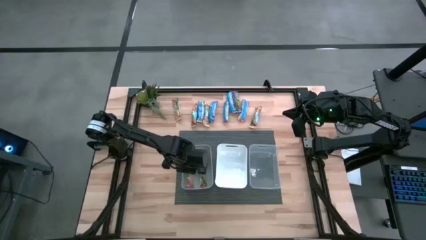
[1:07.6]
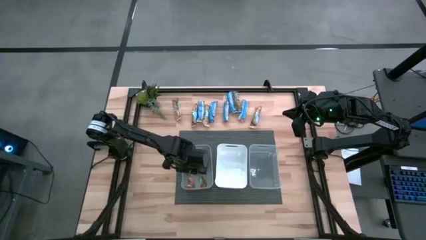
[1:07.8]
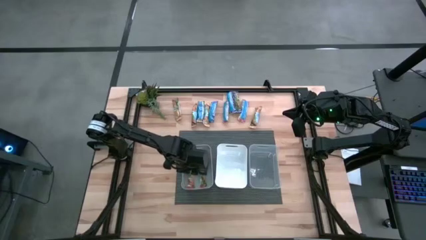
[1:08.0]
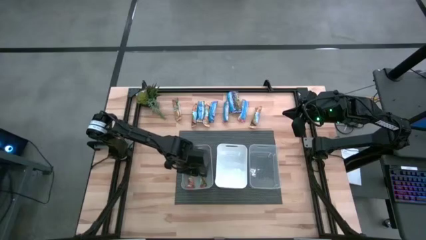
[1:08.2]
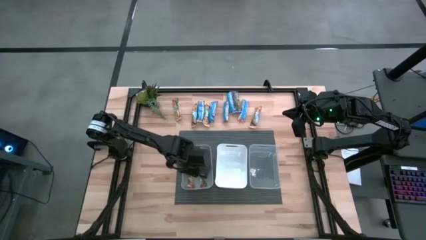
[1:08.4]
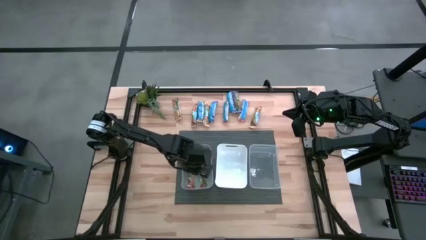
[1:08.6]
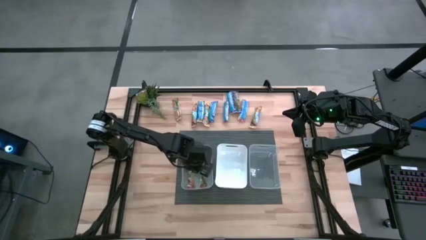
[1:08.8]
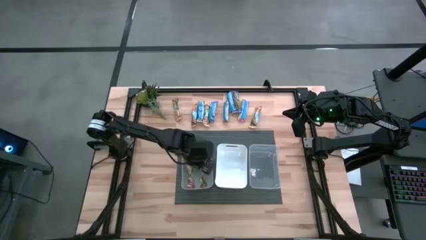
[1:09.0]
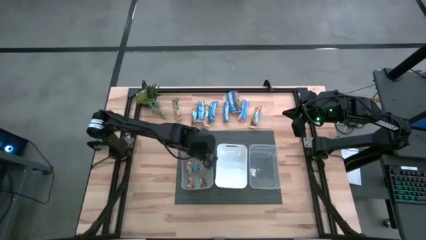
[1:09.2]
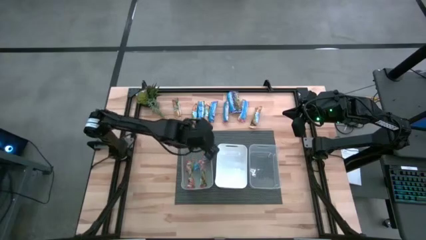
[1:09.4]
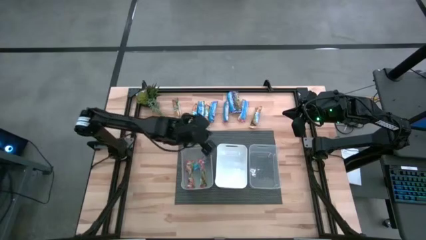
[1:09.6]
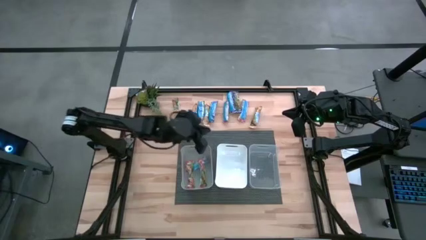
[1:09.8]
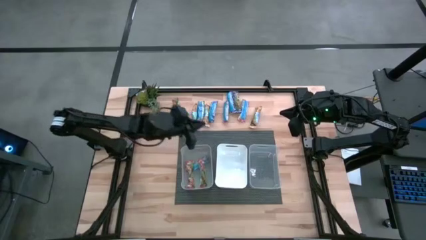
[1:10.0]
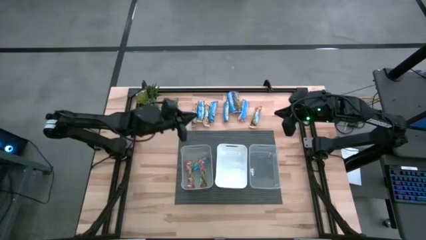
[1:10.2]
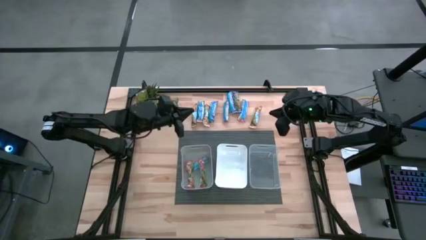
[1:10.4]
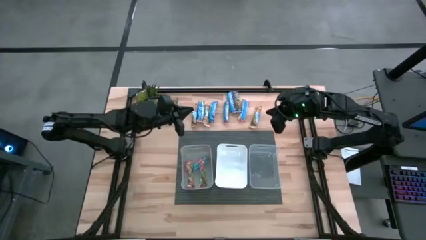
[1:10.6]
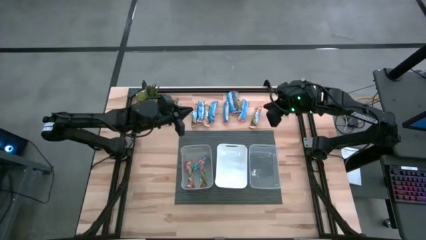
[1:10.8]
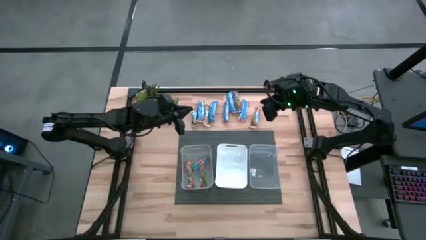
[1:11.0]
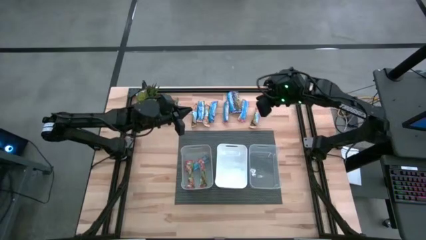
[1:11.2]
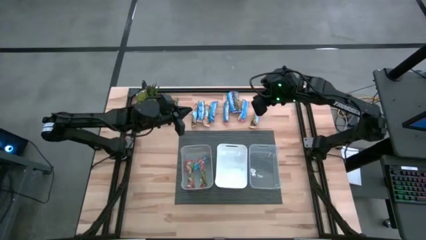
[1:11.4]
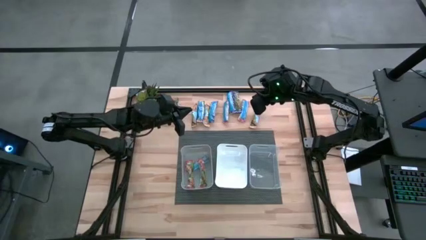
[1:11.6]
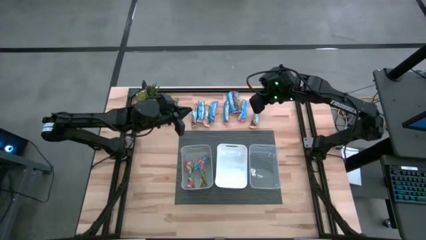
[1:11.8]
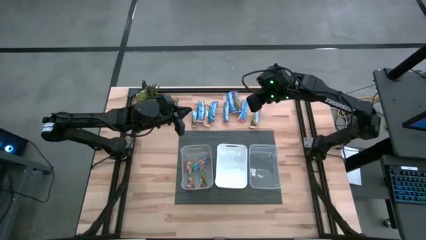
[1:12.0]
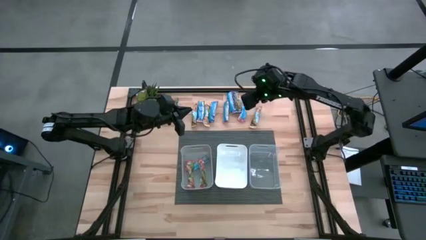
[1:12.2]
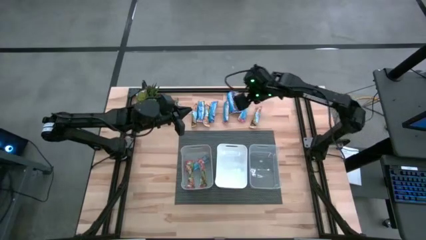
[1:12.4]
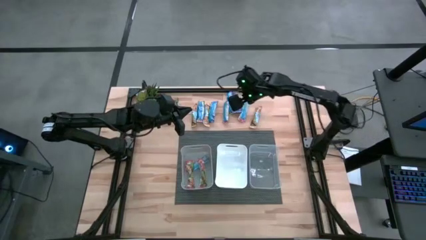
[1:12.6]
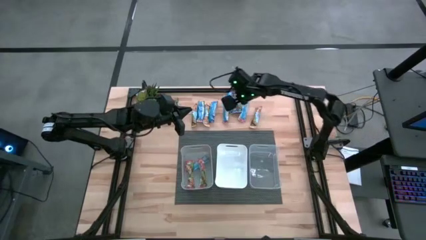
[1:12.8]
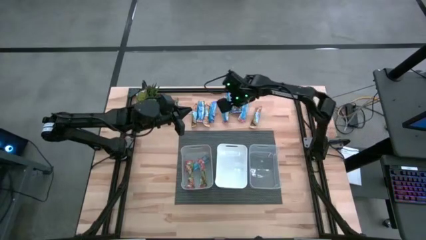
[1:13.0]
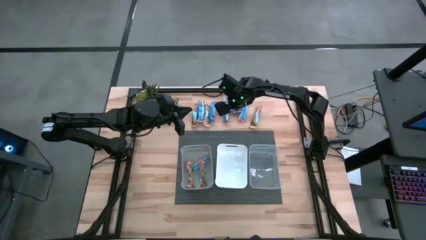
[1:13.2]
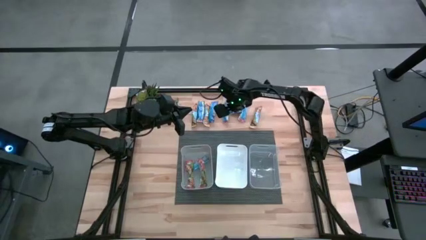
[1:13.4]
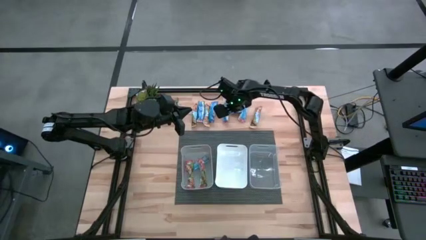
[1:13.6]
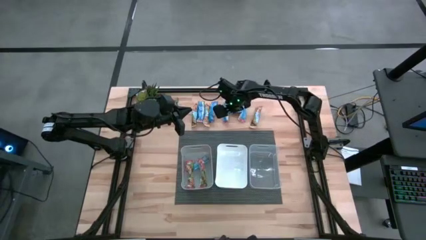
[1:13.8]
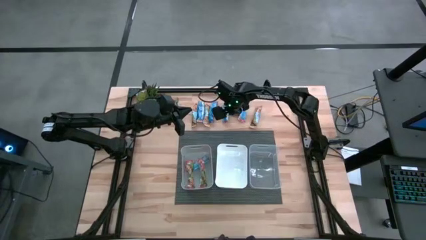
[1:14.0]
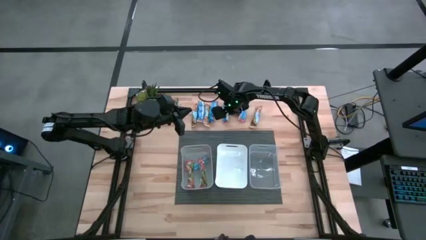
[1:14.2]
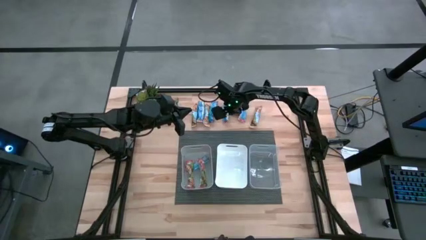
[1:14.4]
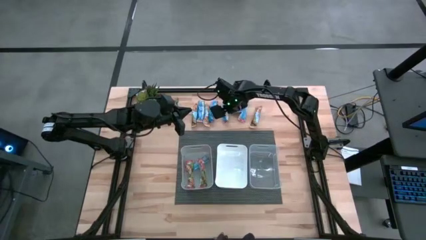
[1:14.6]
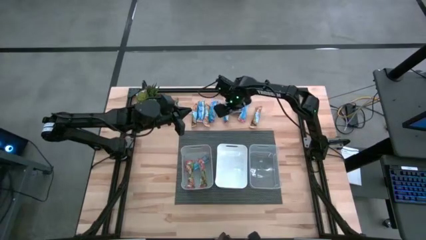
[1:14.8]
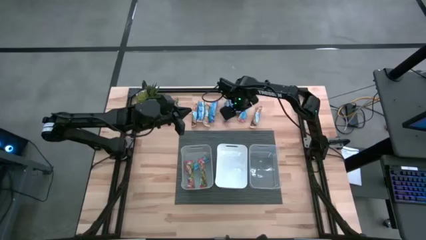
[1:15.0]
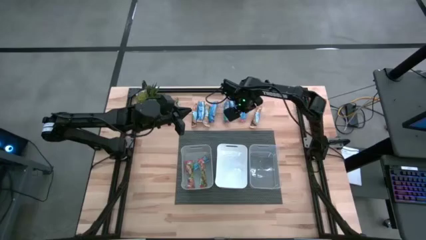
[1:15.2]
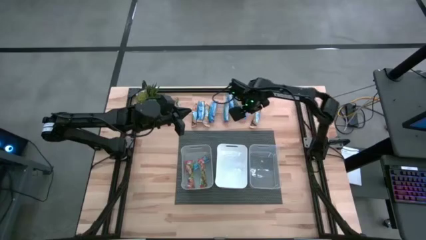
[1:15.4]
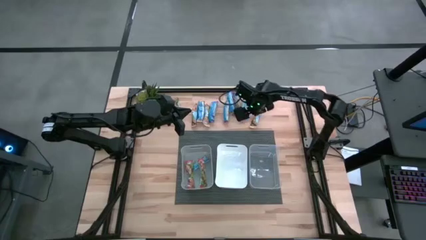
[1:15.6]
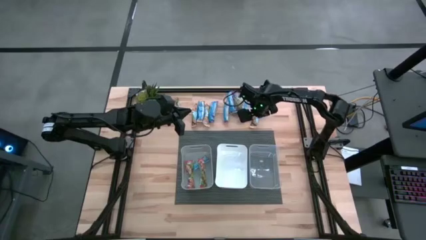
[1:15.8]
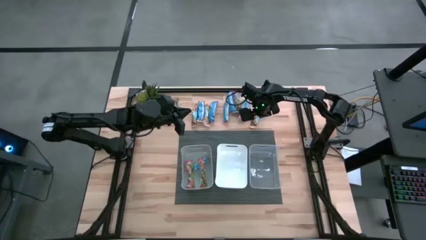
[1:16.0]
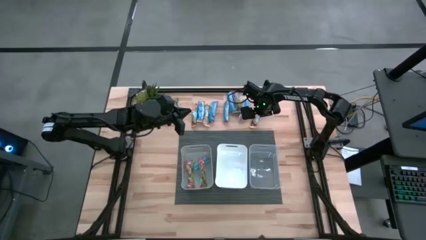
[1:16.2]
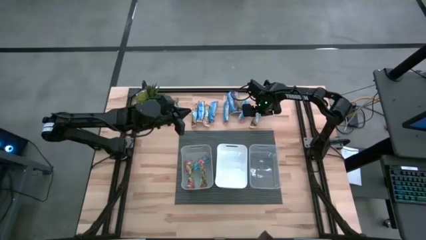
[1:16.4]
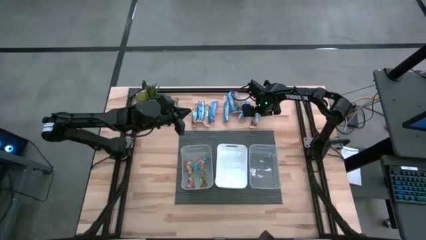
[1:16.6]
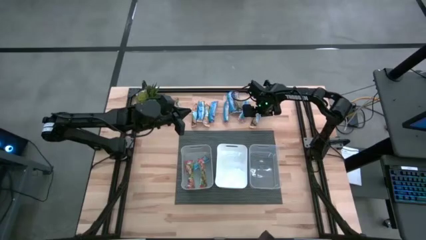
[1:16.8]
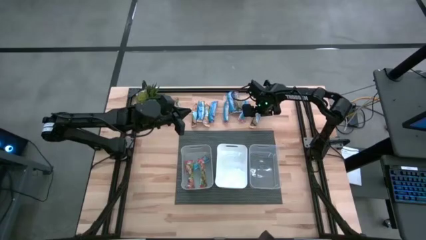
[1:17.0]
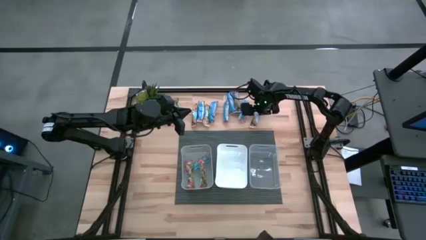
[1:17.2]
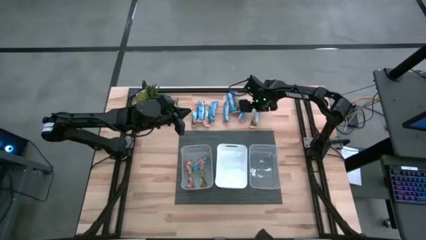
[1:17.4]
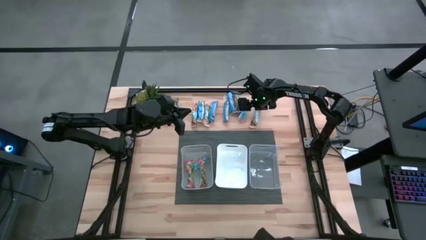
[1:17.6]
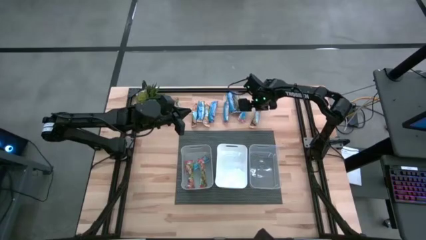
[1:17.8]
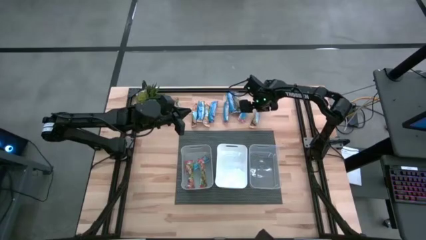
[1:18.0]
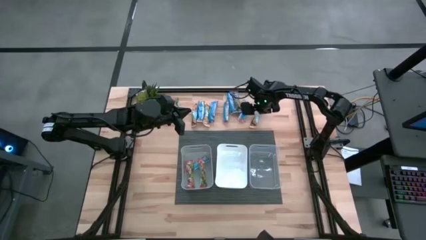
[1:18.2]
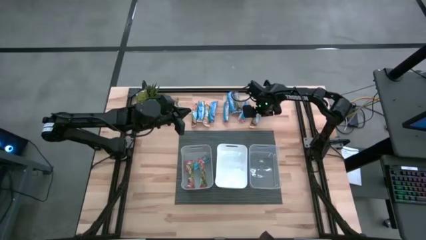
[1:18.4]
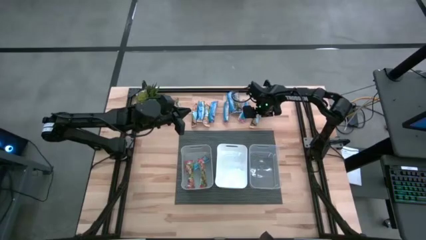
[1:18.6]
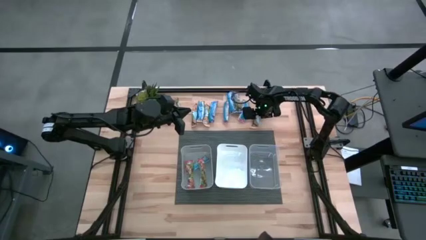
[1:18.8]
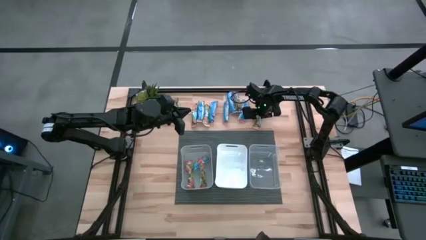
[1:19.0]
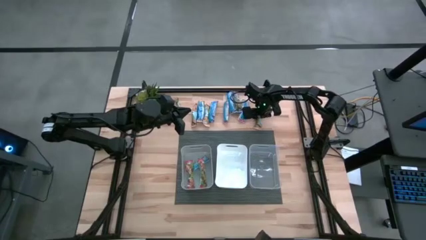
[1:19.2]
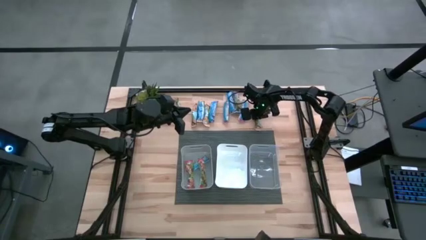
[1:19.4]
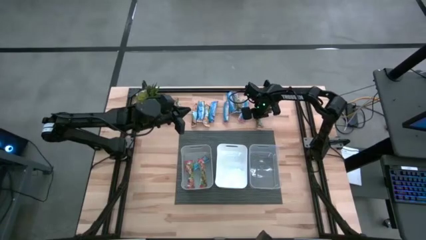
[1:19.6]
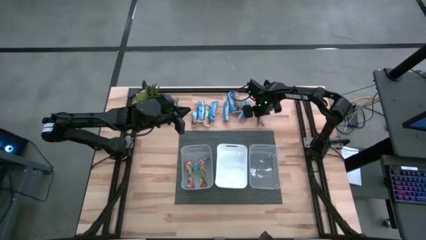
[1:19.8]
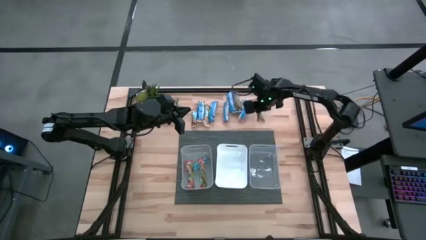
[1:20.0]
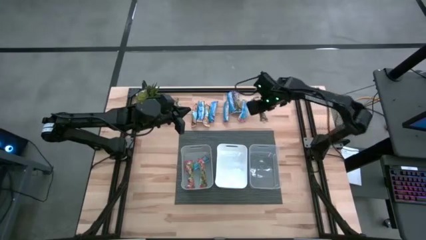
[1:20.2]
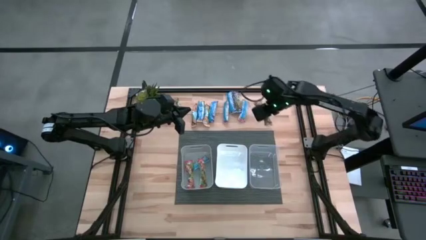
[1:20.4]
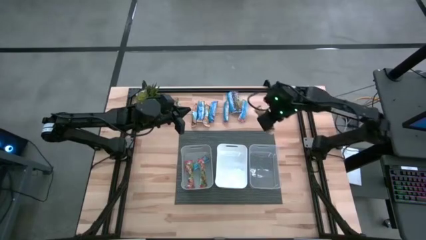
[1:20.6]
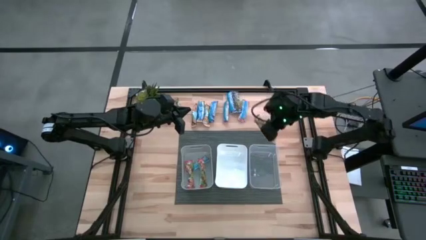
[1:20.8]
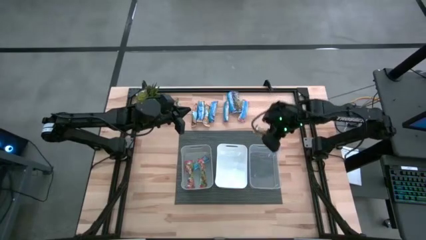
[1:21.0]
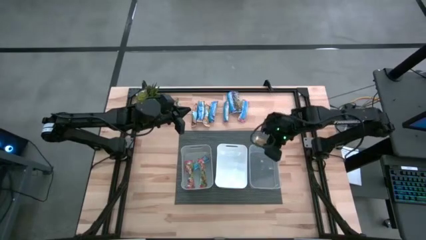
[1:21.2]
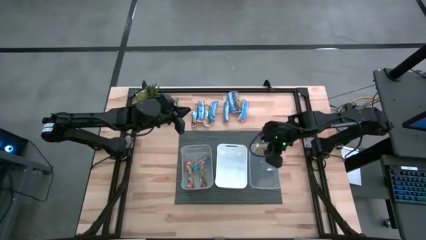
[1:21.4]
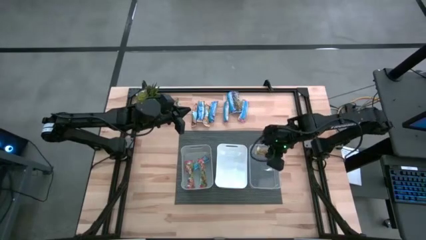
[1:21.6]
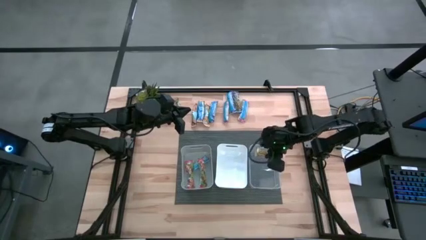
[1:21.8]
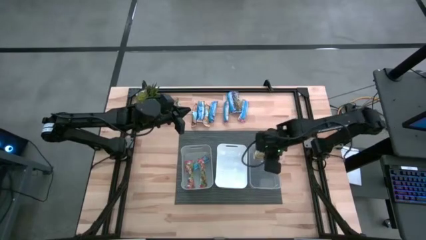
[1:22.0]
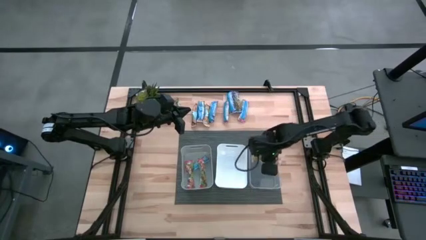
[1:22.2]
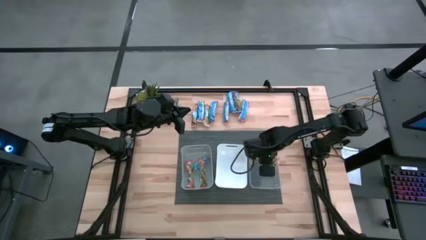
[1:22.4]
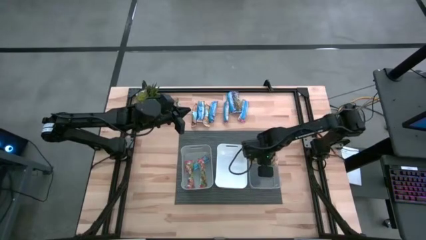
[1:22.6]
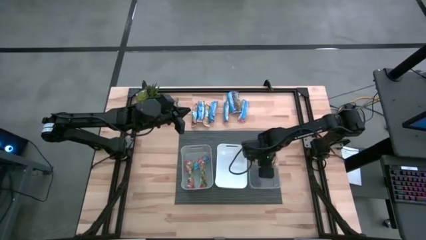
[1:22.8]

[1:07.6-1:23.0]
Task: Pick and place Granola Bars by type
Put the orange granola bar into the transparent bin

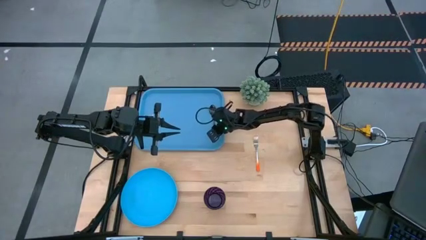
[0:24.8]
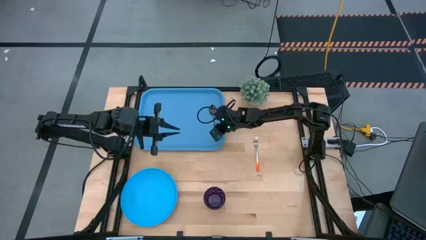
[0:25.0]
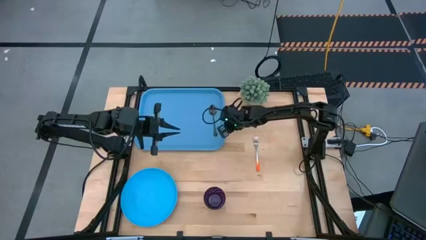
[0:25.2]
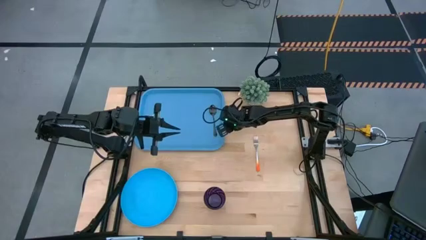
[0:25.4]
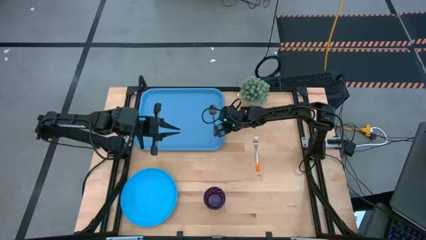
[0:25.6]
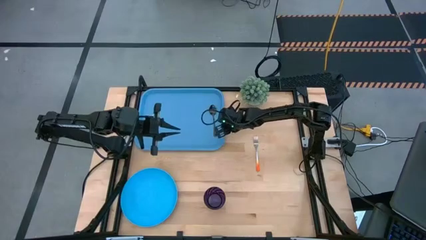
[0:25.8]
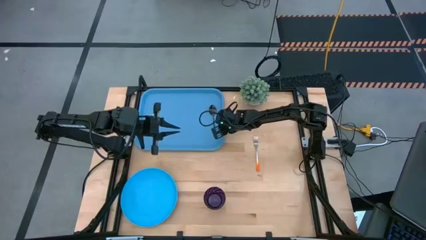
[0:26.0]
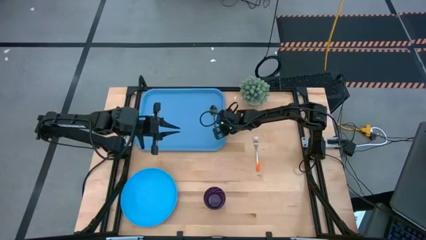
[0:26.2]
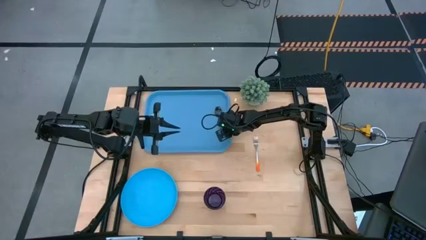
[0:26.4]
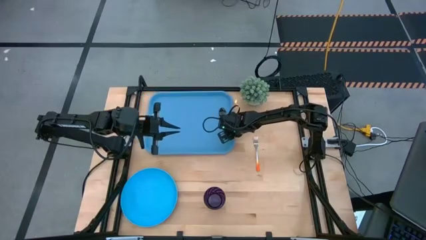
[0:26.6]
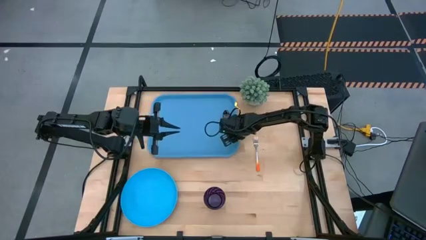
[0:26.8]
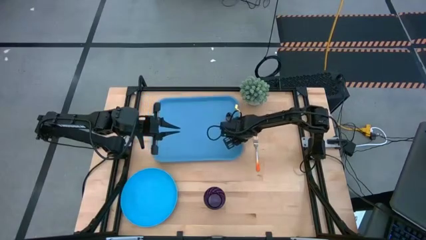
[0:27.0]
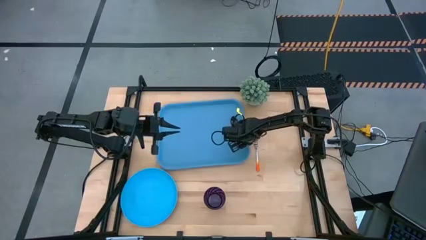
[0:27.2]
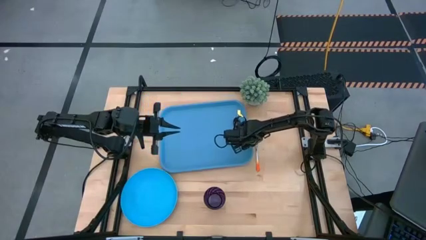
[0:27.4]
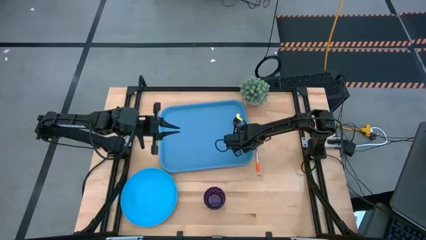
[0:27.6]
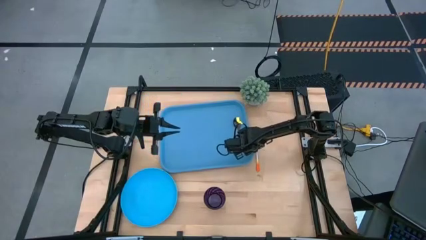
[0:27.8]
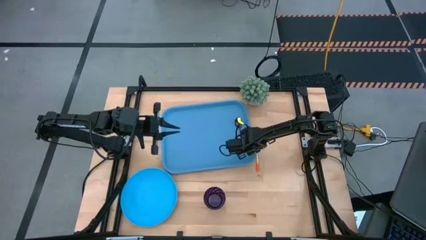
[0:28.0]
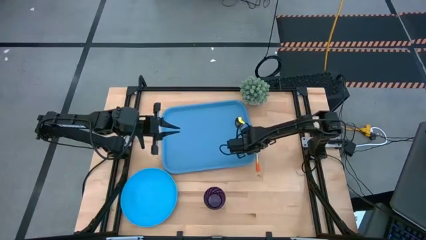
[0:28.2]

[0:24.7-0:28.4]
Task: Pick and place plate/cup/fork/spoon on tray
Move the blue tray to the center of the table
